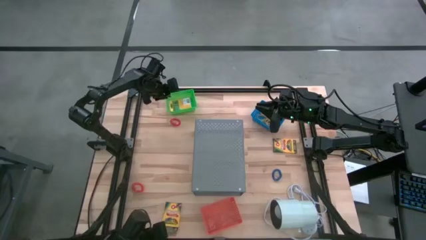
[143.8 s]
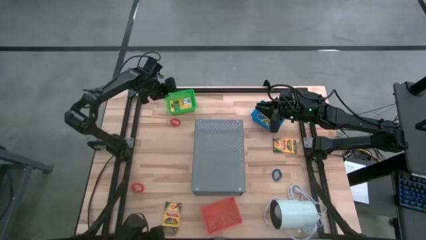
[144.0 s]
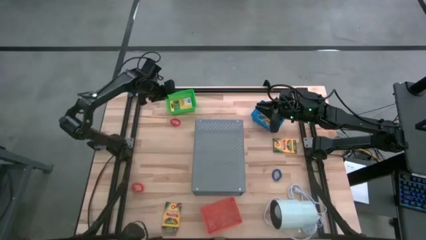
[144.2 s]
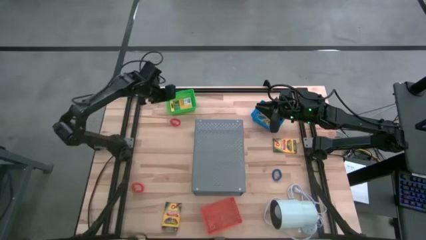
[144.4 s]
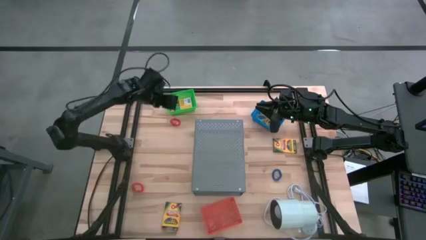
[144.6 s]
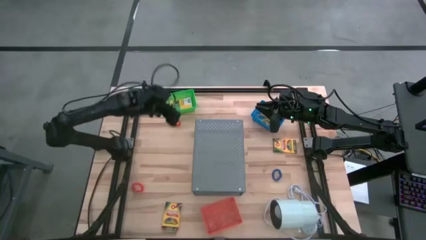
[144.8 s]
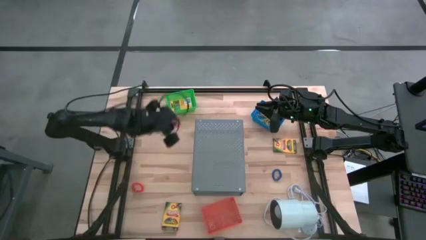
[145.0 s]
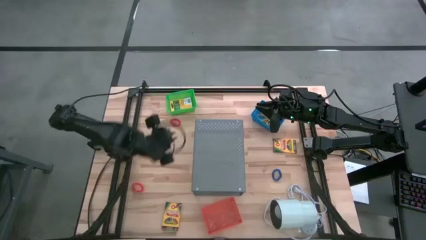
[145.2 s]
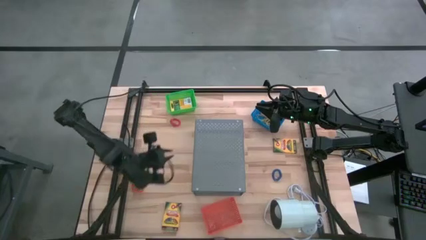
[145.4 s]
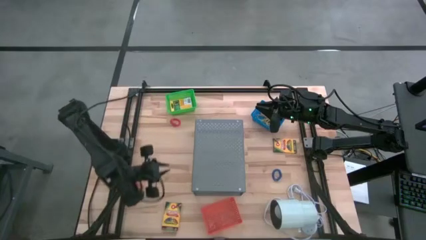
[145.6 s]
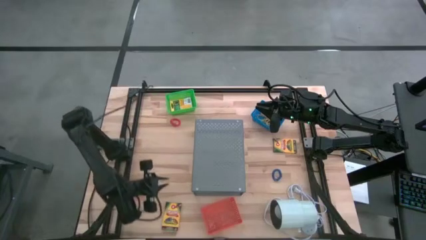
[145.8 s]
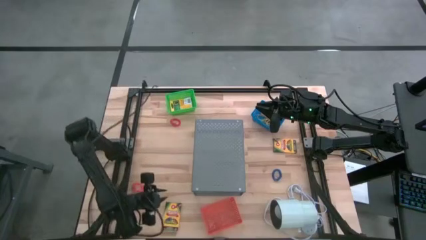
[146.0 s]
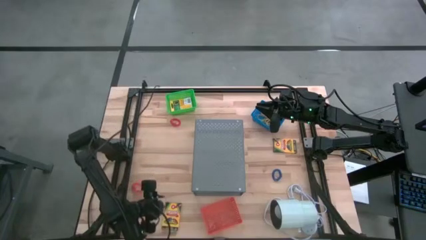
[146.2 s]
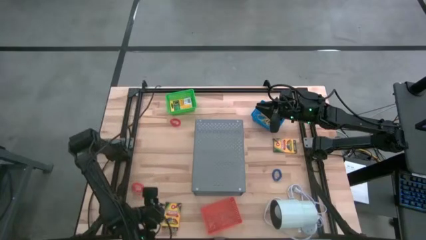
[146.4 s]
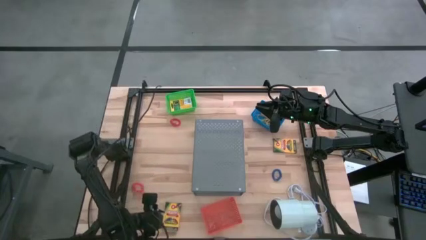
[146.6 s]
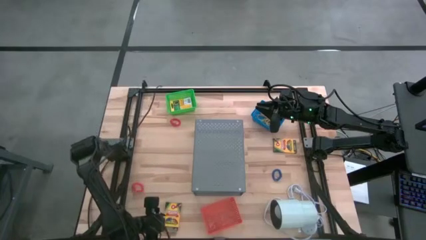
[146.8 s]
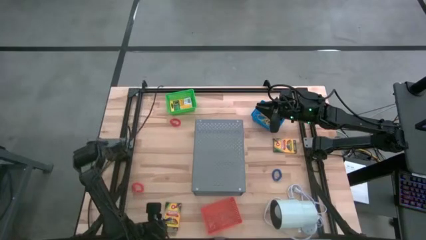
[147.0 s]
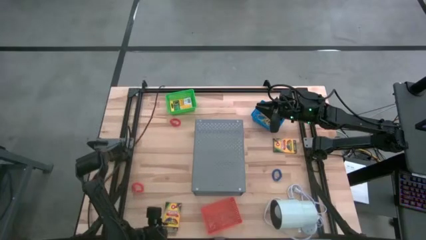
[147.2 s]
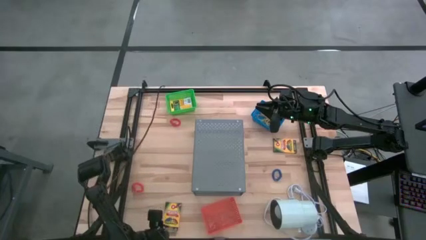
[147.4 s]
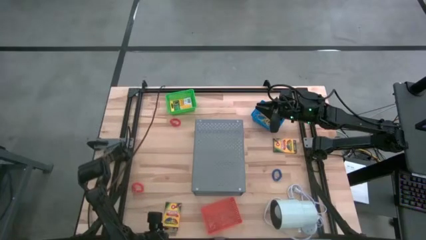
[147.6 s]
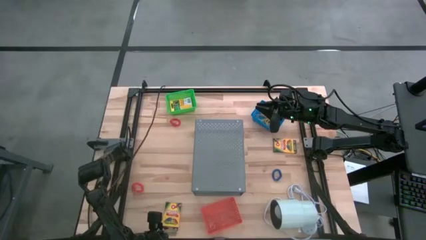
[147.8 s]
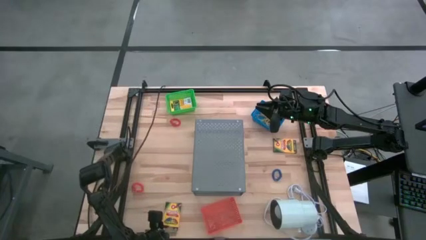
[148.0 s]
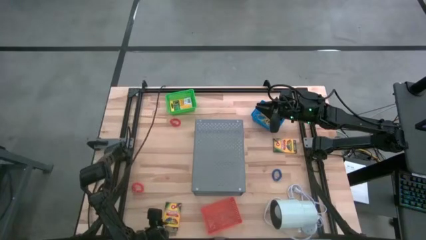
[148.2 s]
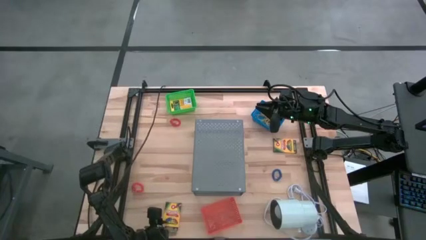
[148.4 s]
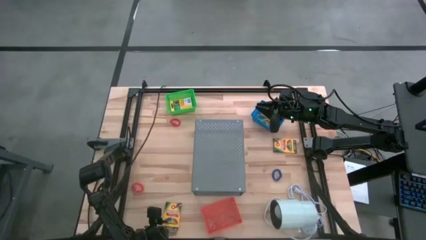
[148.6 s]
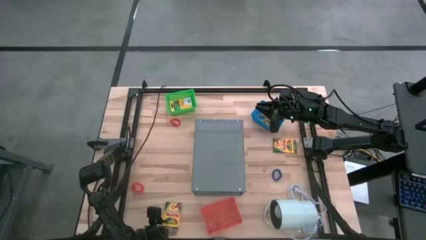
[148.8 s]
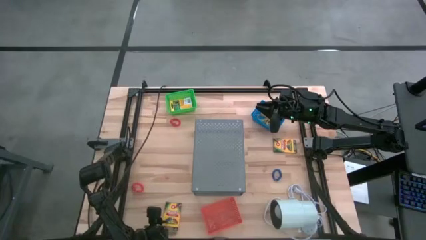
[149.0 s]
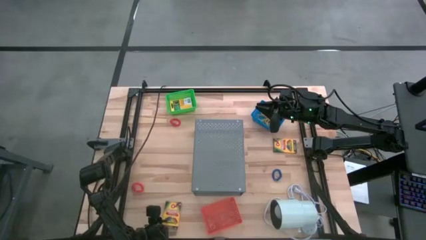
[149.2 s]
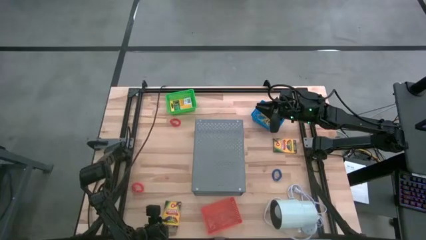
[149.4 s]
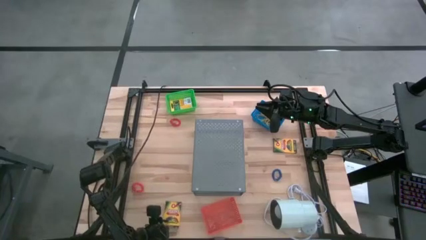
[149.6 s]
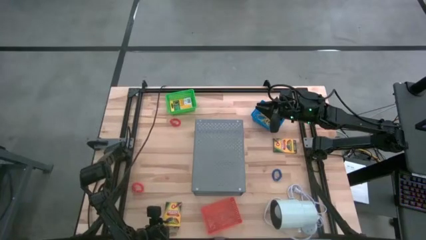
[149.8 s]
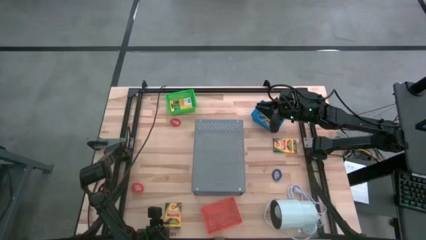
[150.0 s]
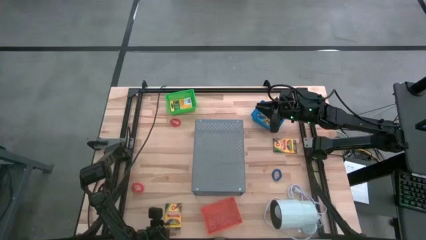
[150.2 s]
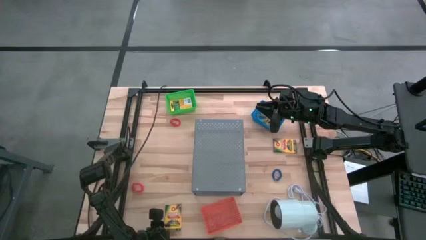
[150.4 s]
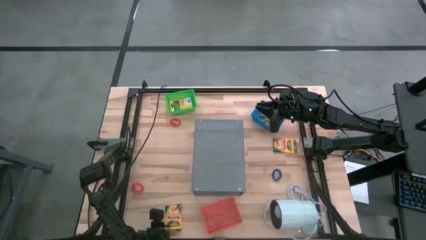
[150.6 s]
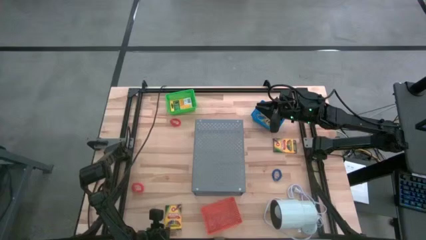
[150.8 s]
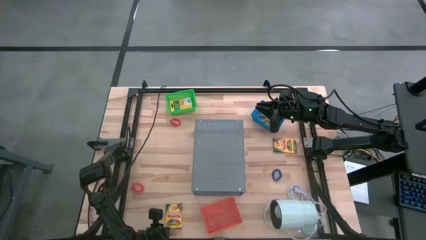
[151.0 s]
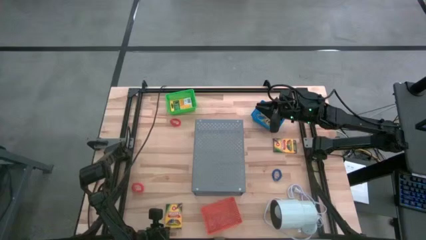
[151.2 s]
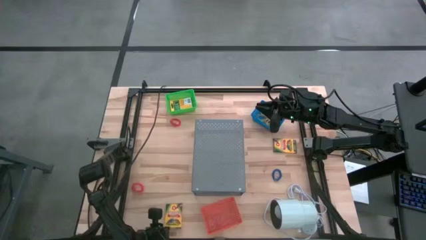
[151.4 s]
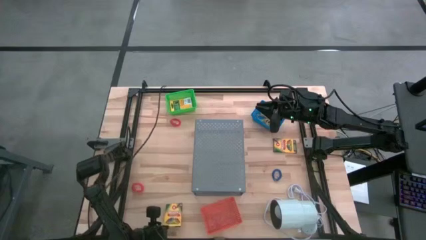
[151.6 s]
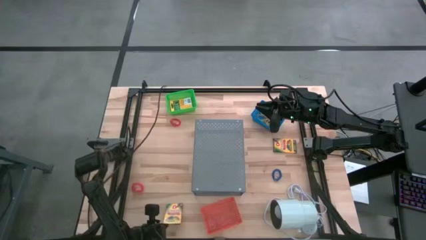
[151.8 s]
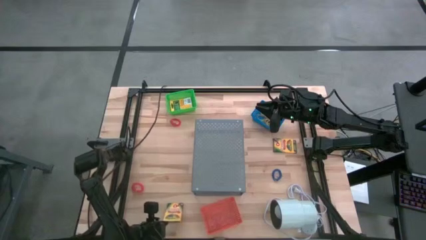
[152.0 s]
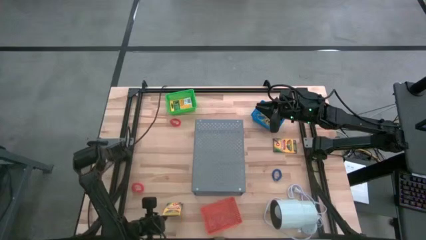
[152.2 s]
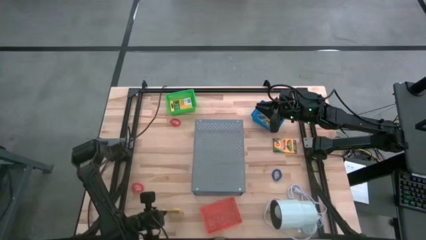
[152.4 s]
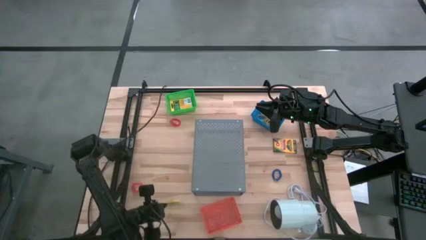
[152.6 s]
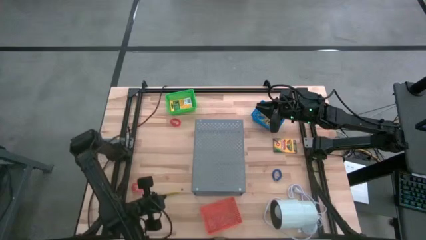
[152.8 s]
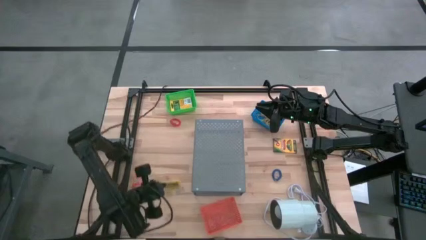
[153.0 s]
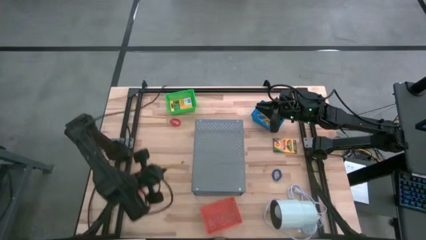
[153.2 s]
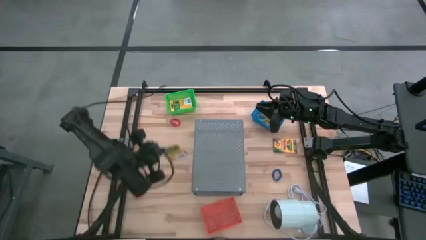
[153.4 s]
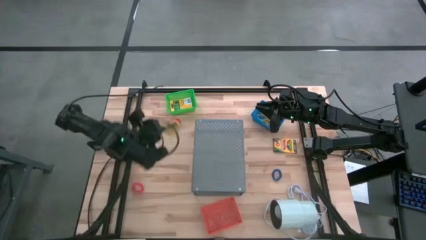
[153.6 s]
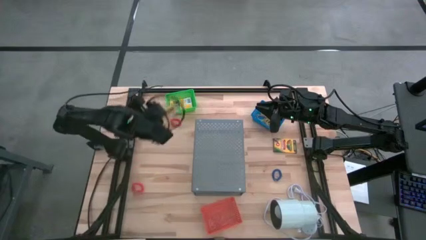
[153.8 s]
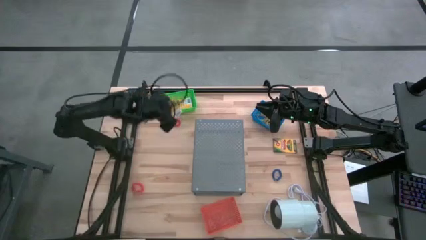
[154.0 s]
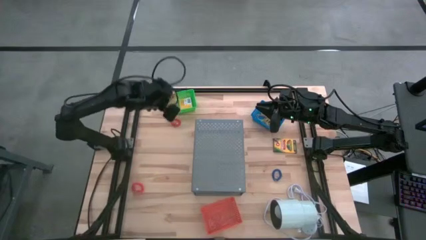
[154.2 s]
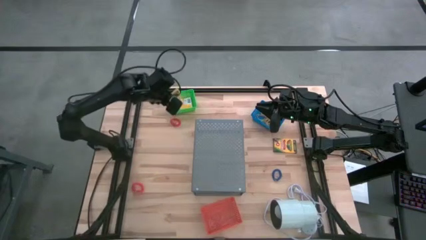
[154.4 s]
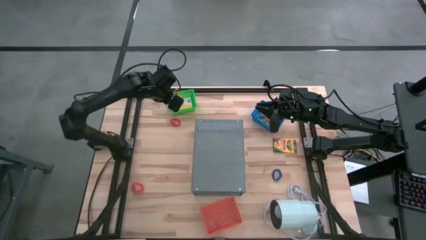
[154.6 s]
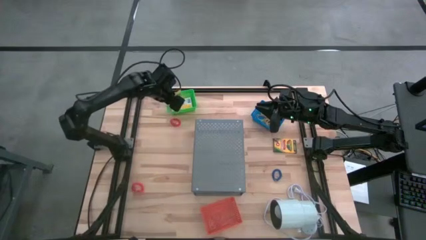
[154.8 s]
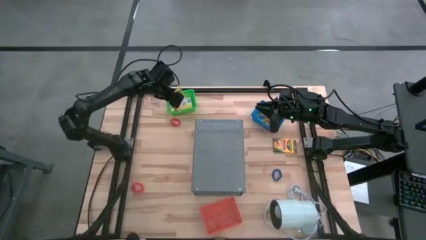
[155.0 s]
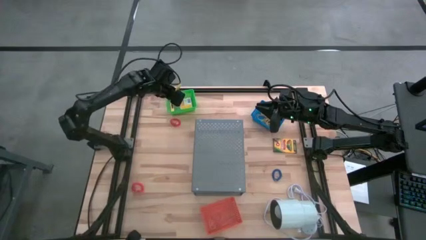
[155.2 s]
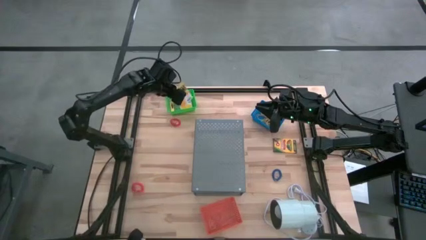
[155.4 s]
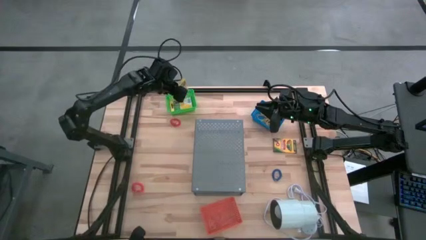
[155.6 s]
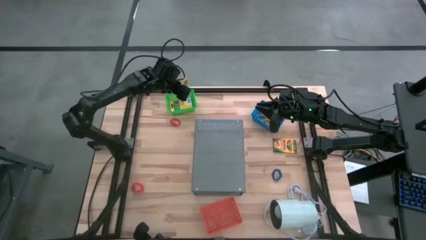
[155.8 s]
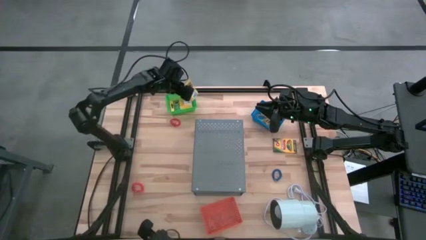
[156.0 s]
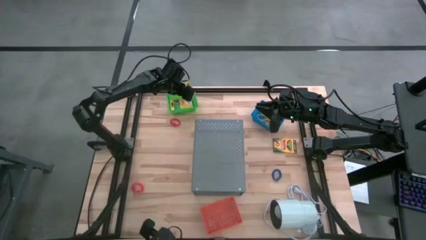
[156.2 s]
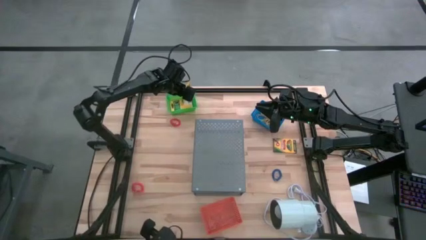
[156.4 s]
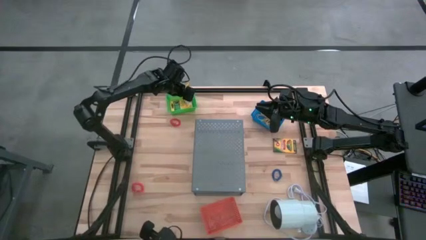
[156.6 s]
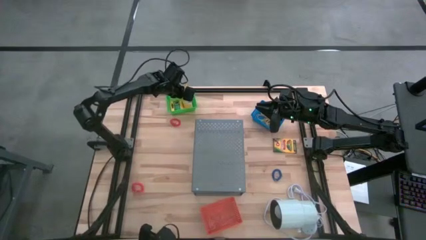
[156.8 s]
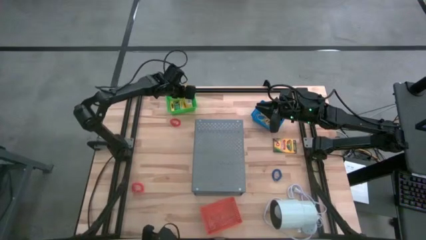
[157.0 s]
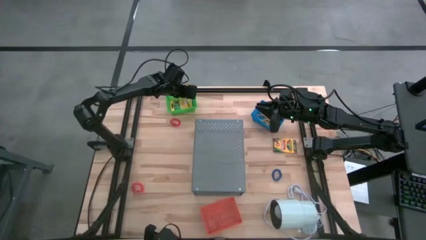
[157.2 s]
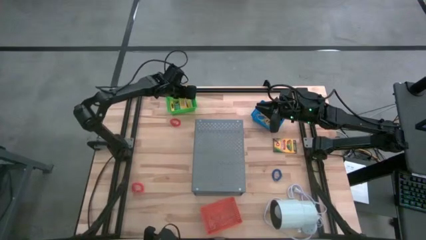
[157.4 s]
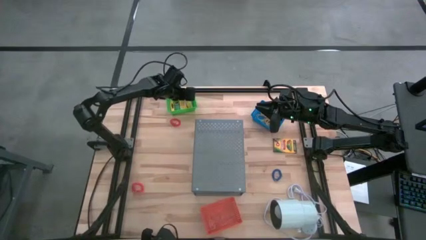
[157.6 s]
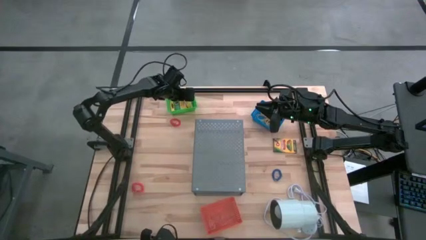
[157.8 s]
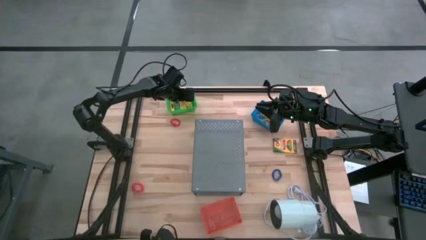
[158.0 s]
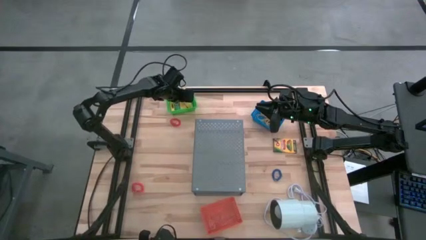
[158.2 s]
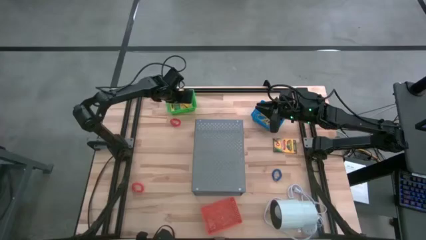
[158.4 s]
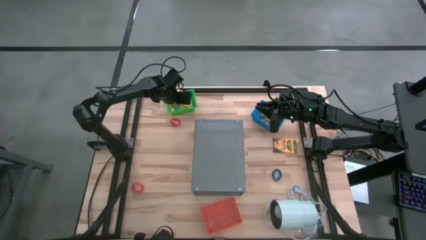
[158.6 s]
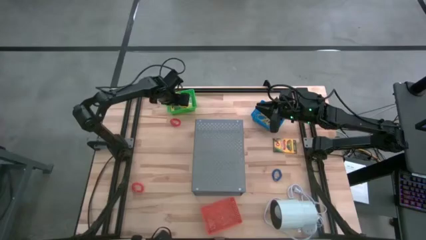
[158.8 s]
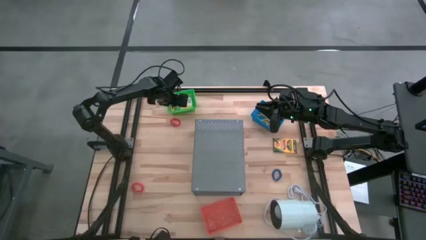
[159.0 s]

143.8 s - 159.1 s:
Task: Pick & Place Office Desk Supplies
Put the bottom yellow crayon box into the green basket

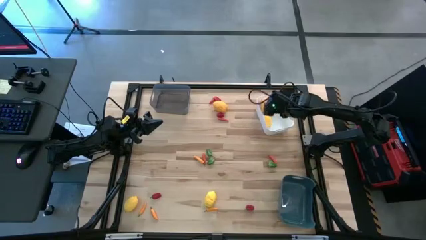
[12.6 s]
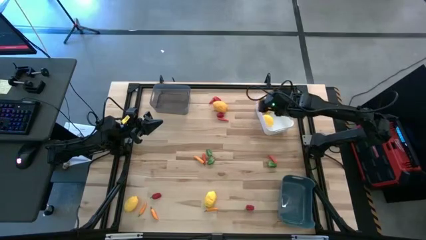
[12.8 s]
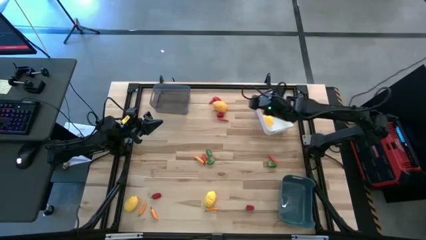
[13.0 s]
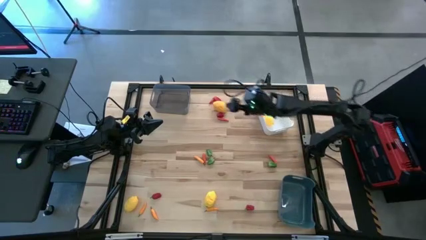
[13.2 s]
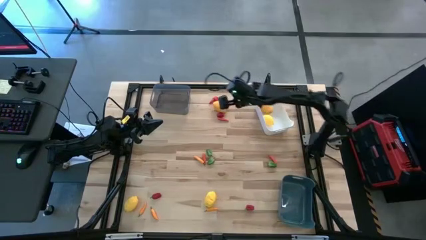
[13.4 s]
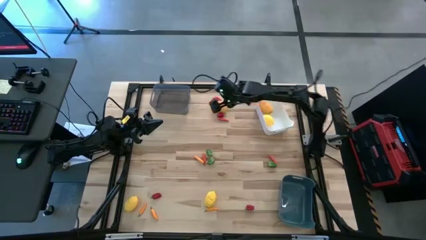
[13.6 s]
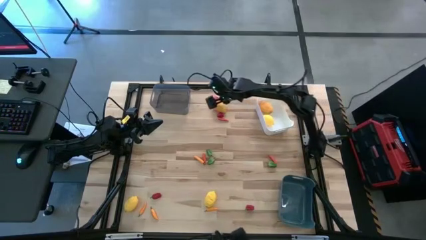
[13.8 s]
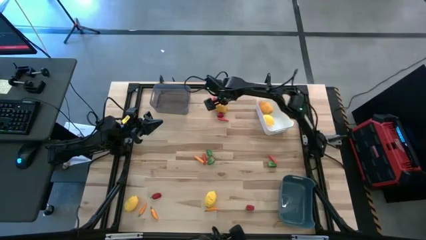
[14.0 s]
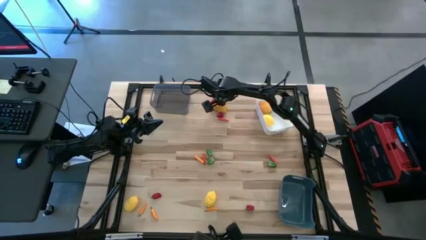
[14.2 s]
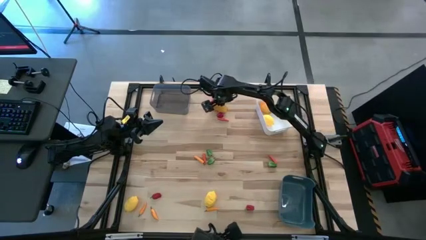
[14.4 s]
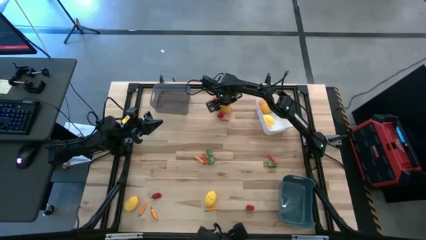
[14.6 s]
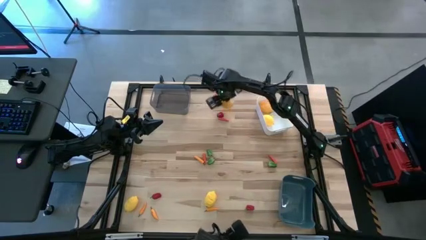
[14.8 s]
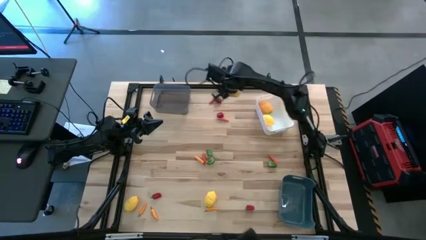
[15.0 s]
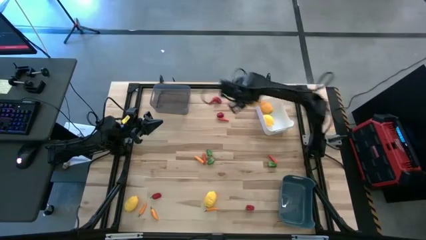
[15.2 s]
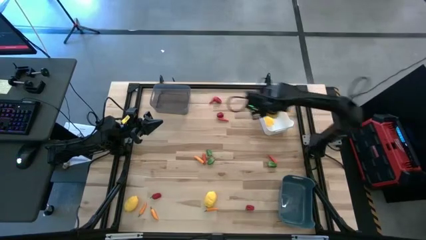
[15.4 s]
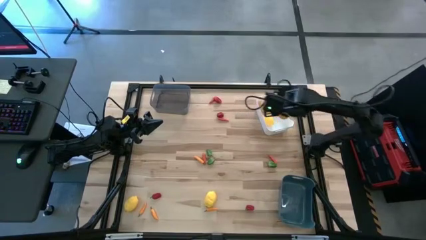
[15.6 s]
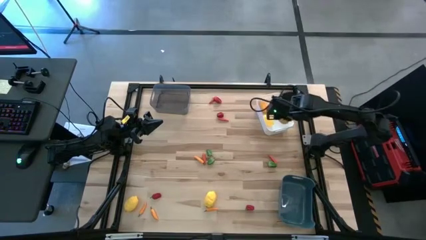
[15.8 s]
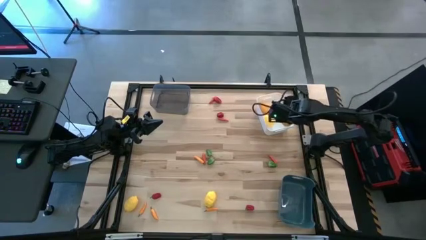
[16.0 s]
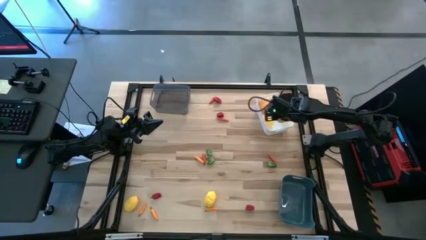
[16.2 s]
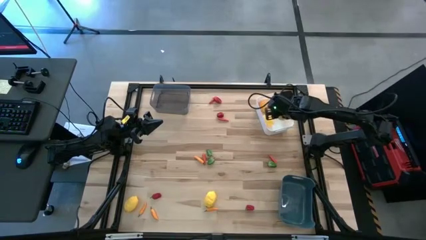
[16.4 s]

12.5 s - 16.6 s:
Task: Sort produce into baskets
Put the lemon into the white bin
